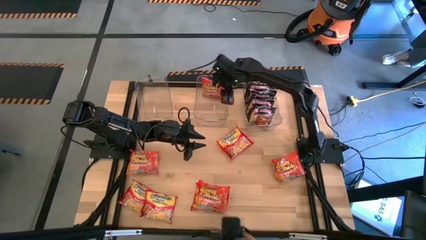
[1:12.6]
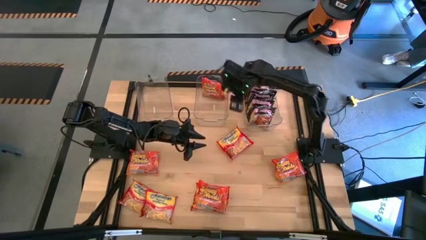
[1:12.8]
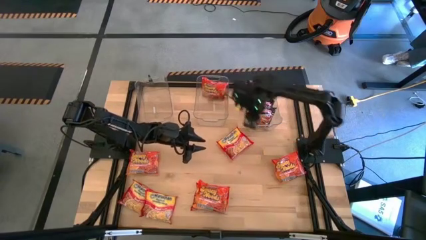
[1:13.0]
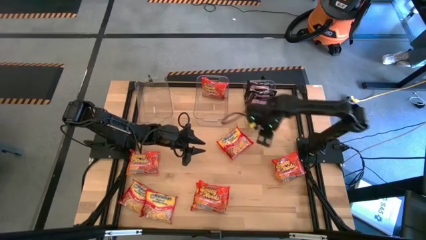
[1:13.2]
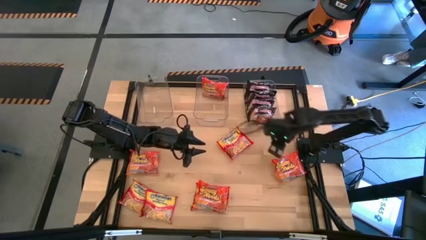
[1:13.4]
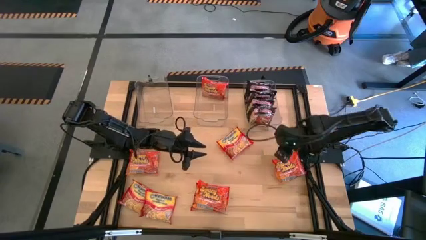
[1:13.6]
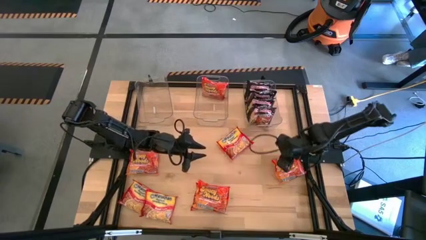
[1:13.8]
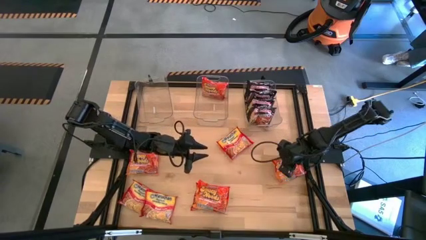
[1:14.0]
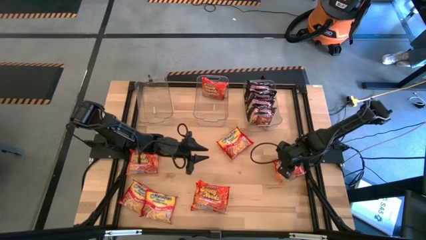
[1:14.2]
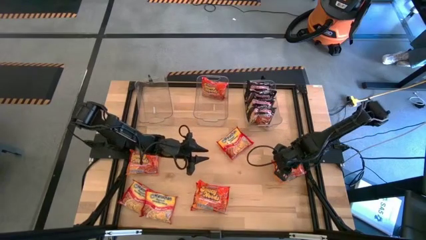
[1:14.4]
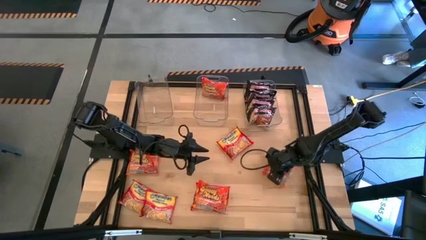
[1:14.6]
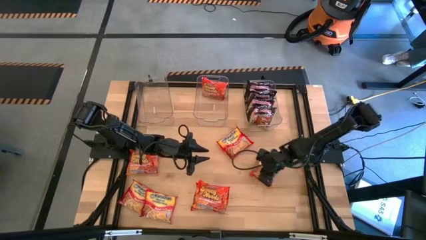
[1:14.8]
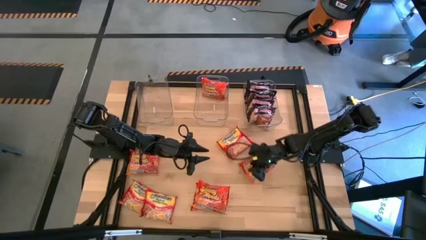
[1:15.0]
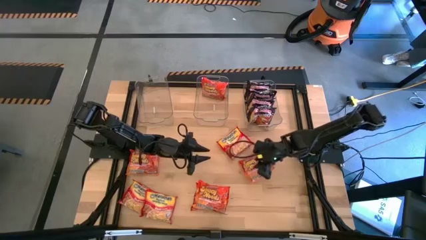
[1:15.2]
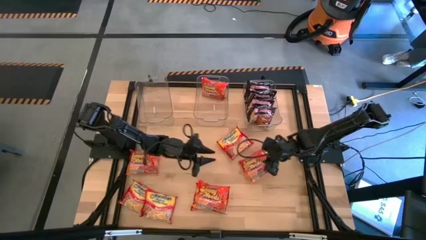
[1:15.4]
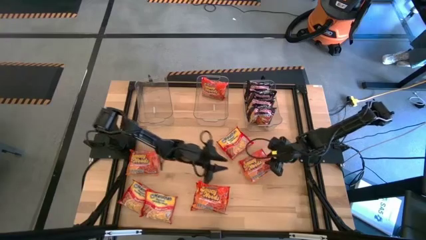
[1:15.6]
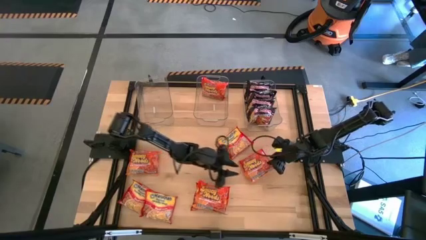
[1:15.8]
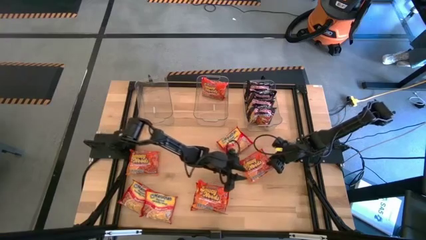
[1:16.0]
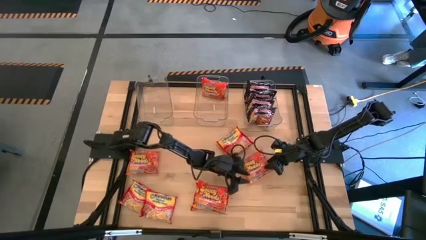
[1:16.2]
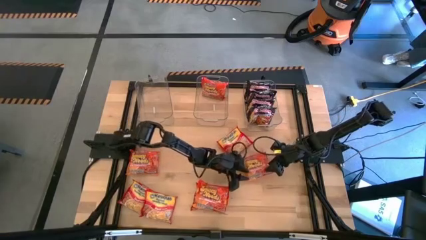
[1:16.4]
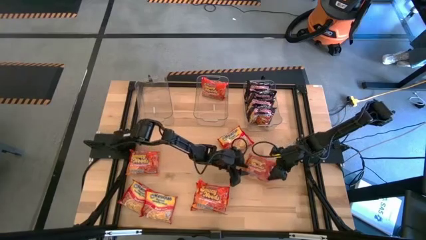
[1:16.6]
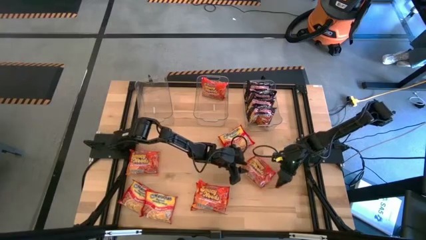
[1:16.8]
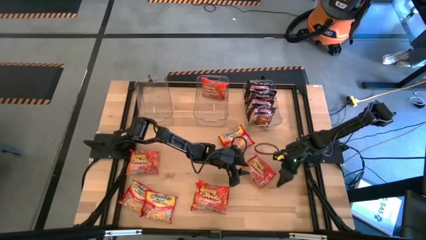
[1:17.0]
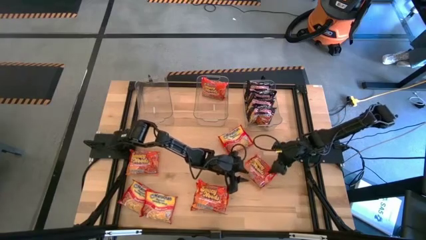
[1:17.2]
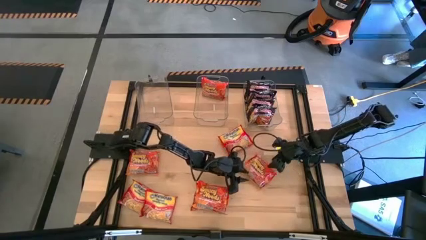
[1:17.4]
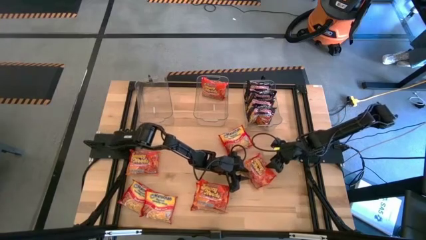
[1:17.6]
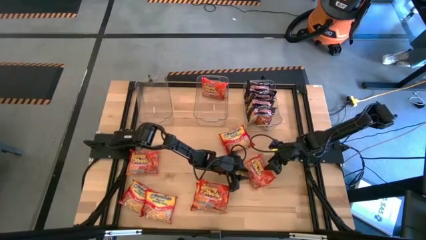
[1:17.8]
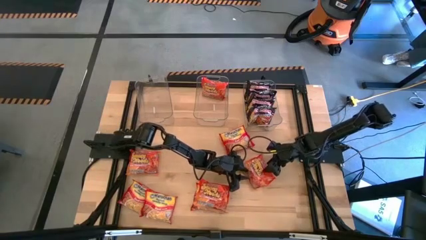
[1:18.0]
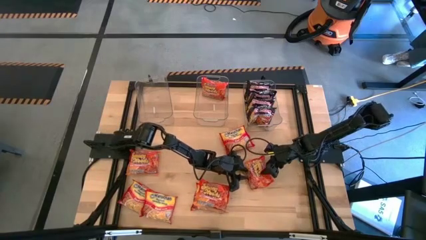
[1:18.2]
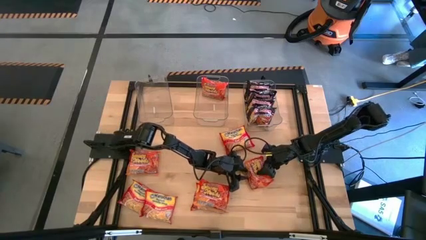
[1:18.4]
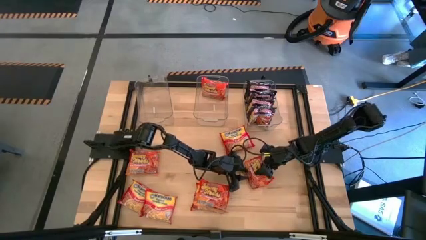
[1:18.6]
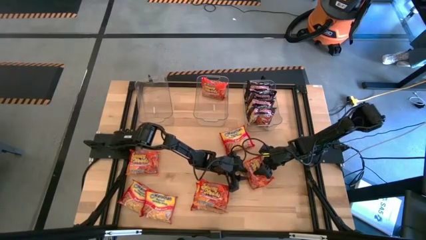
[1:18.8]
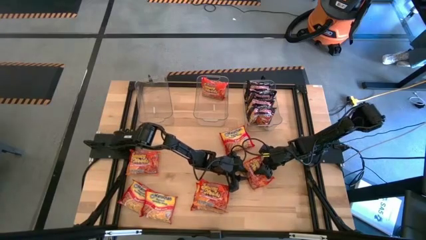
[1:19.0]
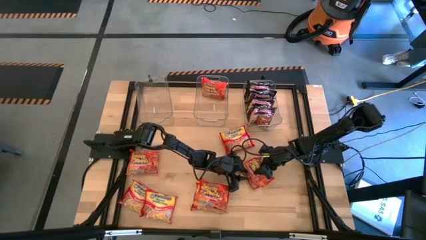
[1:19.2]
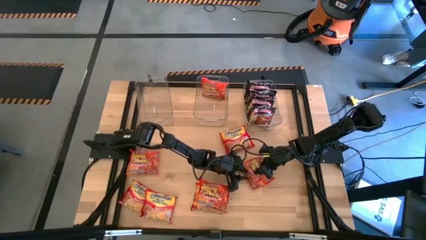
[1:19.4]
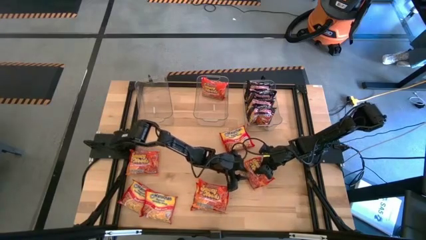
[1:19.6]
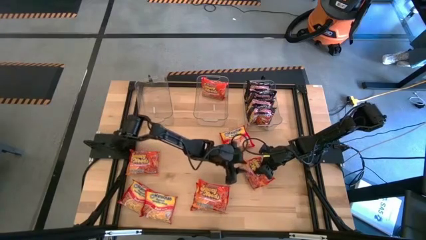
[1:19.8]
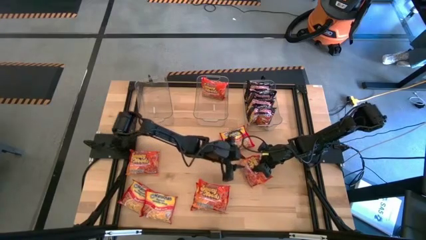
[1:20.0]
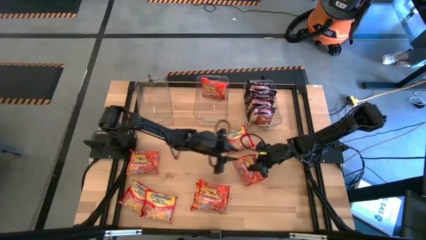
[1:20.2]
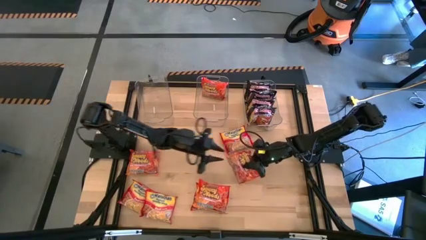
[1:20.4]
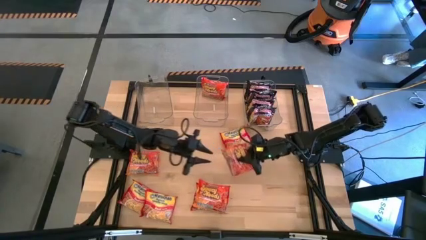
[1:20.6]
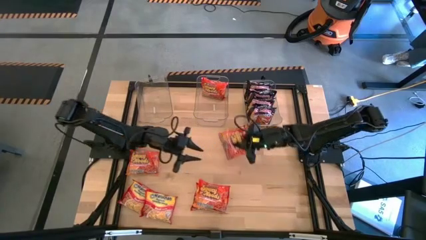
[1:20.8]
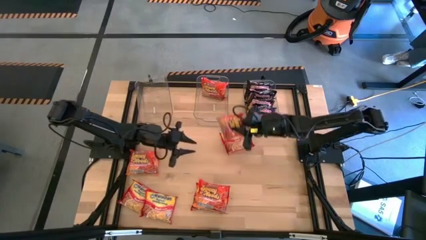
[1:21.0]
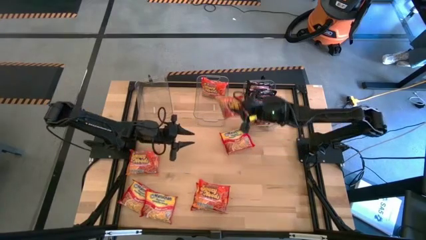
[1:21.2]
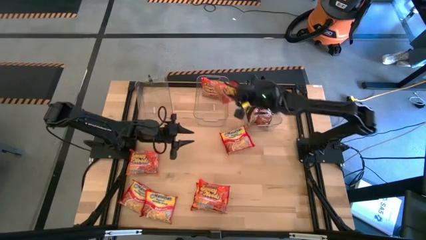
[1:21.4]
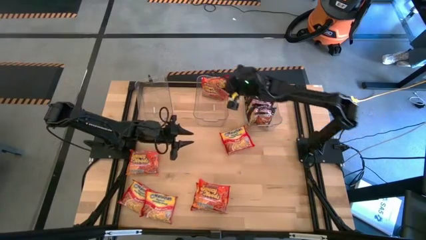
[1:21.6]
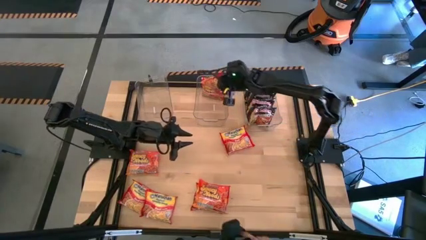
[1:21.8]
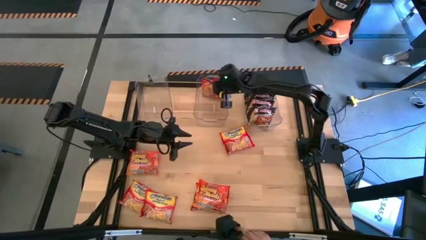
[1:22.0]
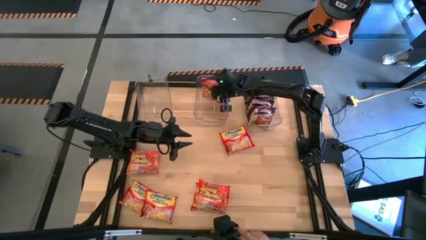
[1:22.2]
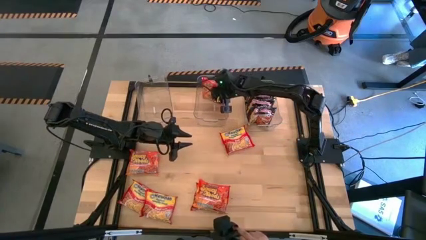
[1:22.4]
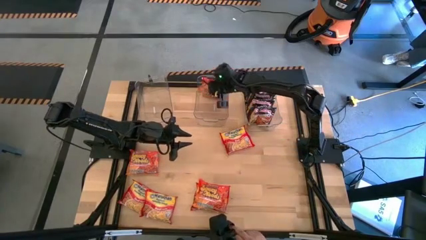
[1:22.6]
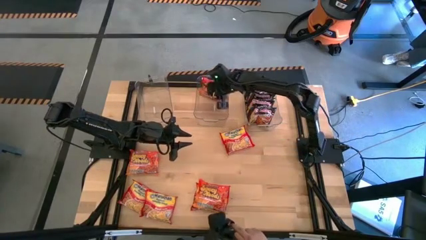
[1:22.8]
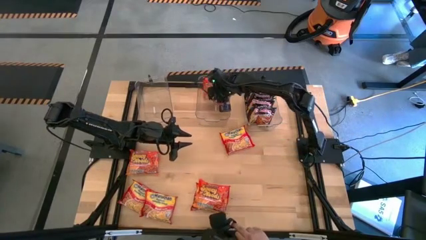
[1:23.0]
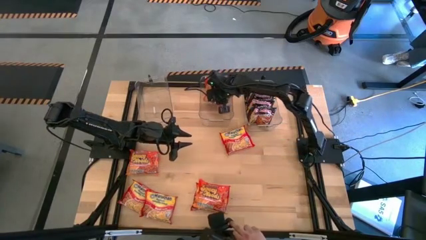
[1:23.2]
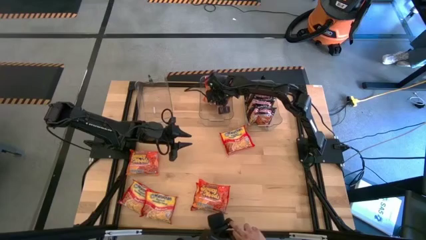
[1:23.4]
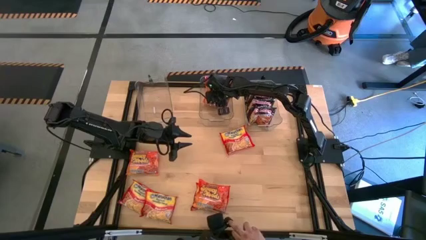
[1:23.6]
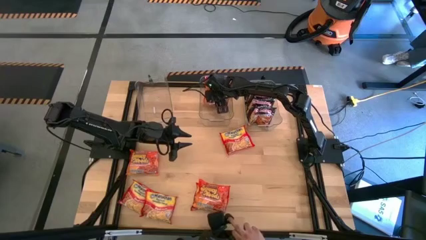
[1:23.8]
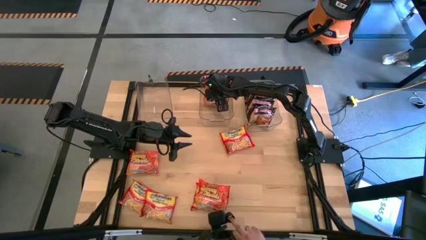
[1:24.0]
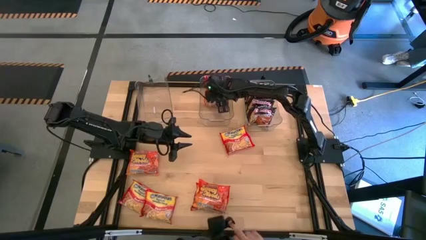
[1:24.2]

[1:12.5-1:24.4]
Task: Sort Maruchan noodles
Put the orange noodle pack into the middle transparent bin
